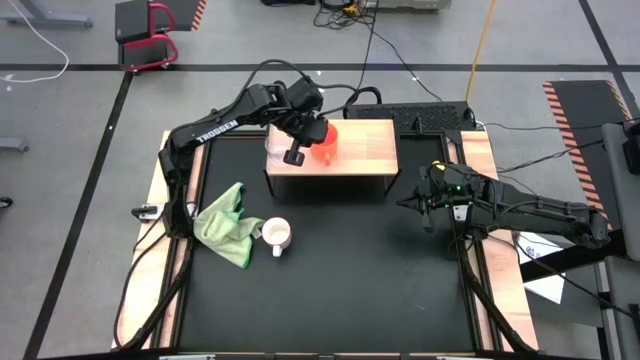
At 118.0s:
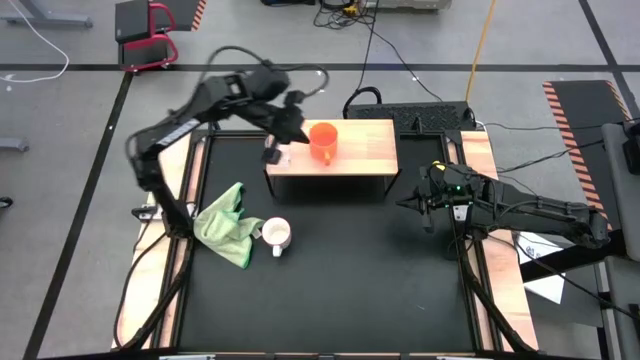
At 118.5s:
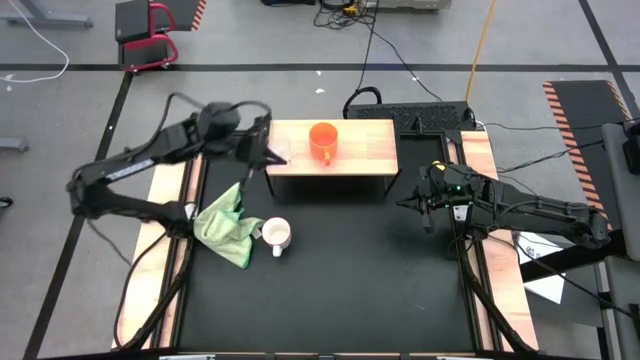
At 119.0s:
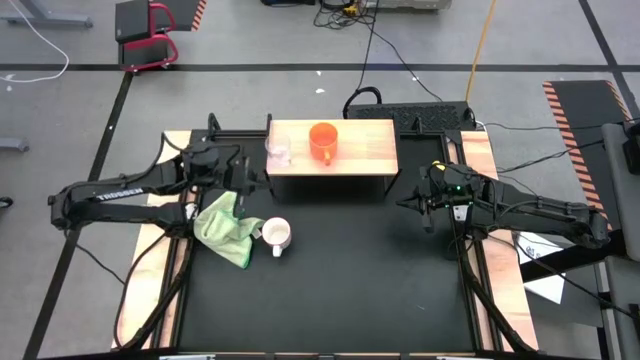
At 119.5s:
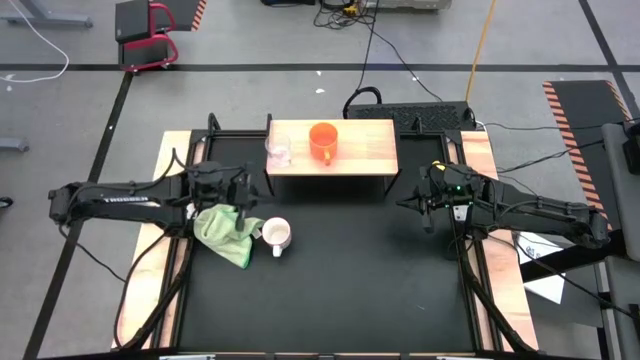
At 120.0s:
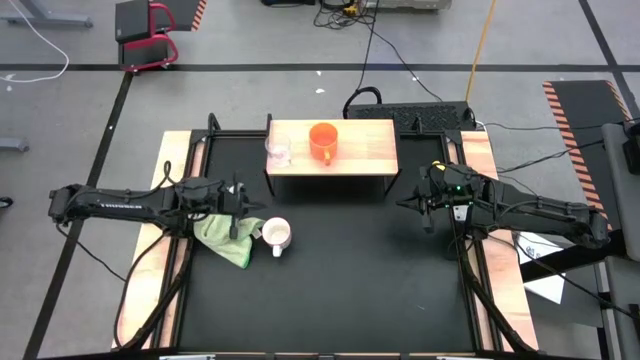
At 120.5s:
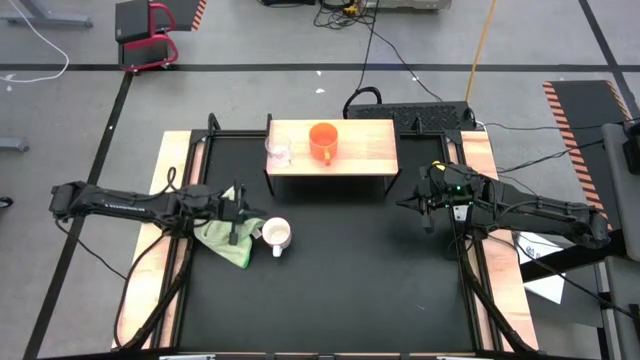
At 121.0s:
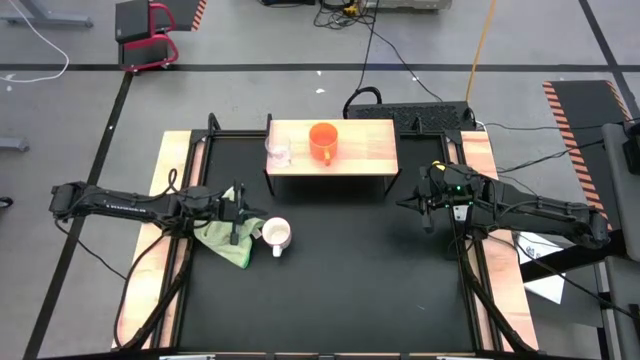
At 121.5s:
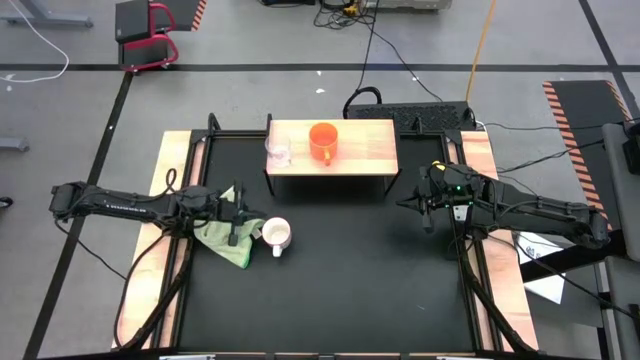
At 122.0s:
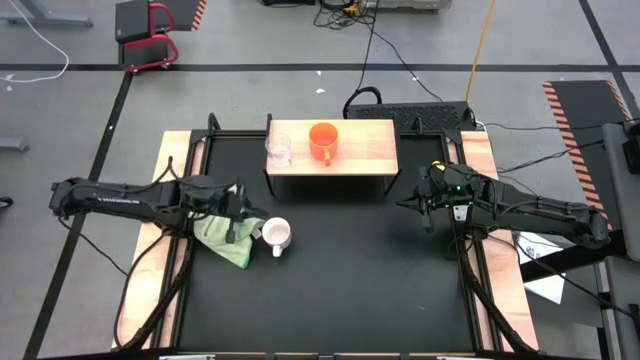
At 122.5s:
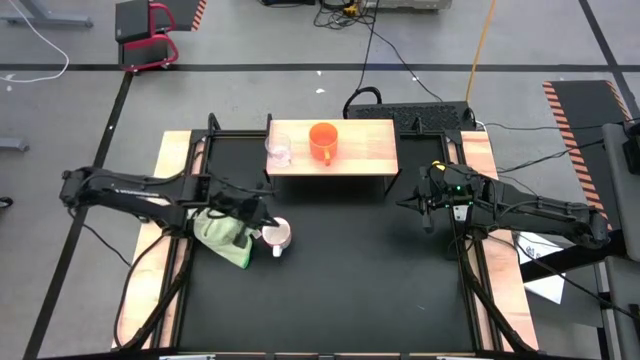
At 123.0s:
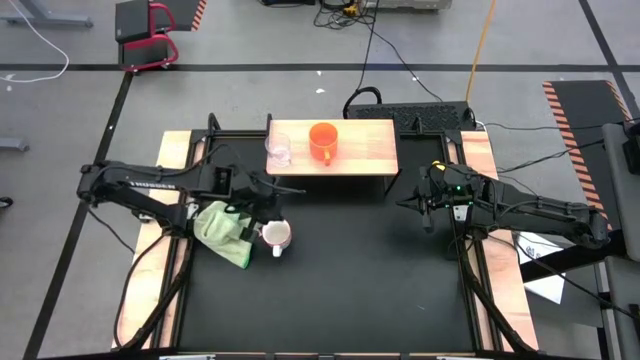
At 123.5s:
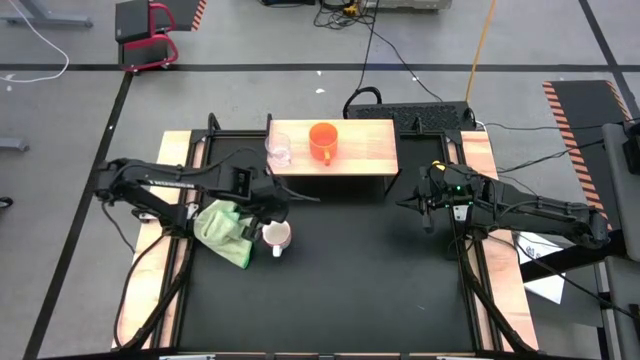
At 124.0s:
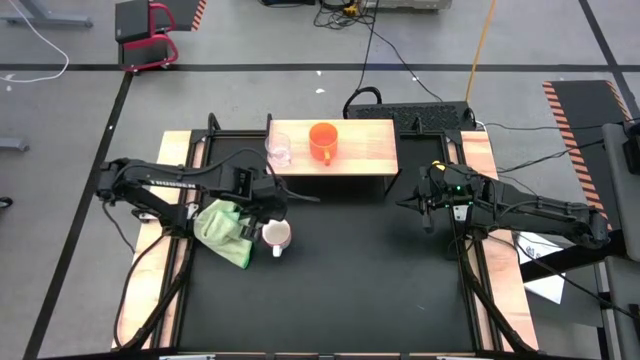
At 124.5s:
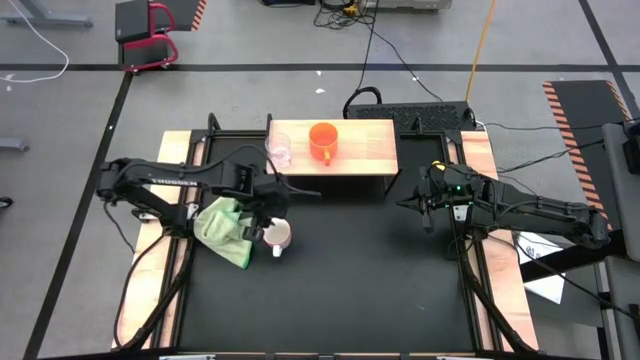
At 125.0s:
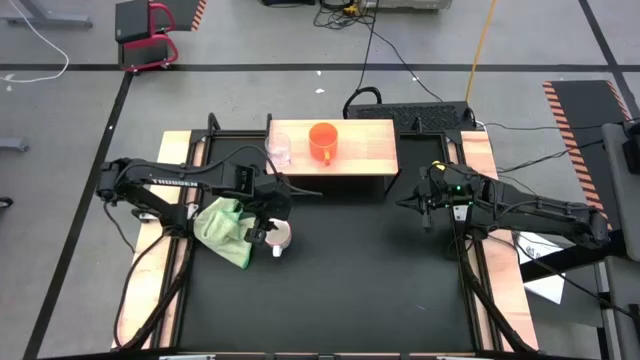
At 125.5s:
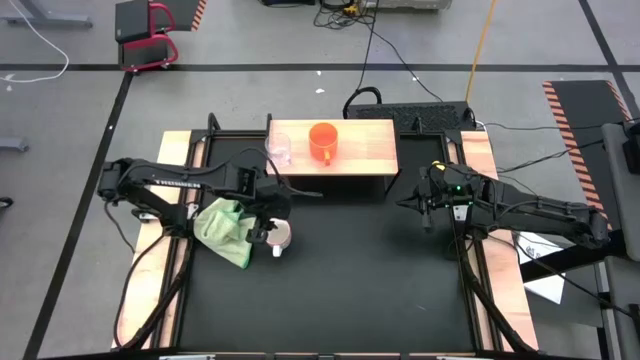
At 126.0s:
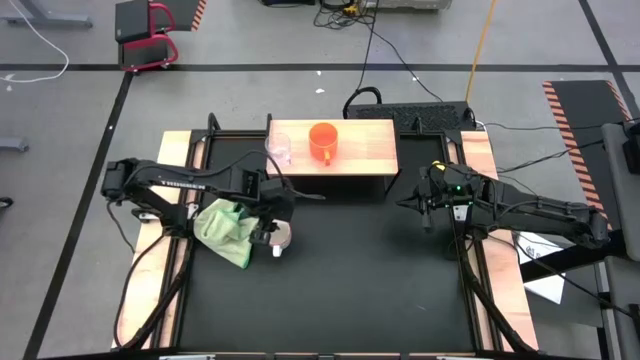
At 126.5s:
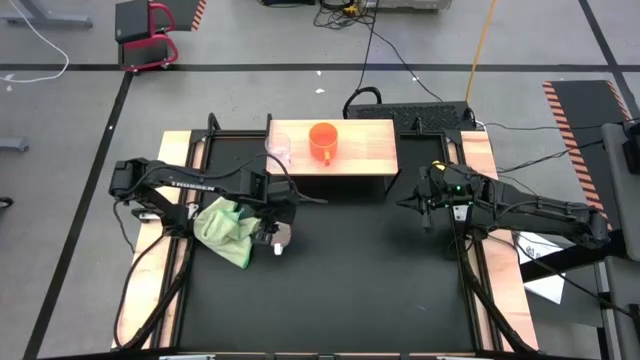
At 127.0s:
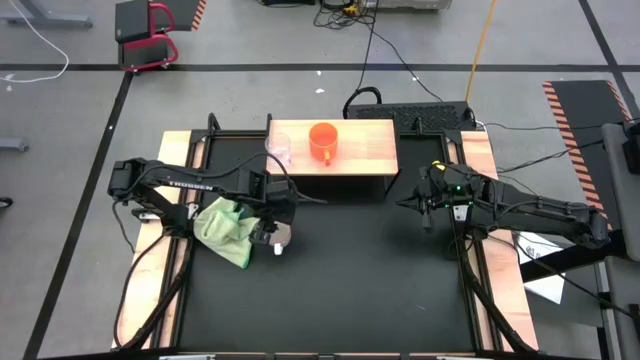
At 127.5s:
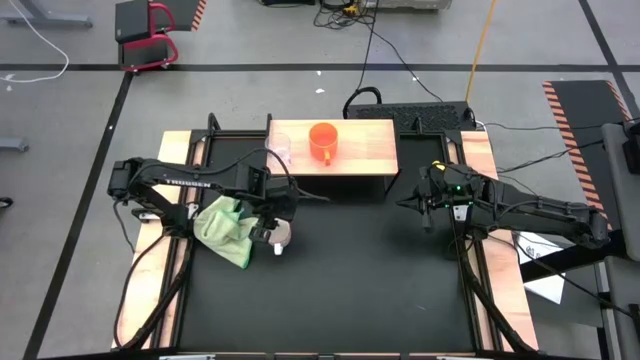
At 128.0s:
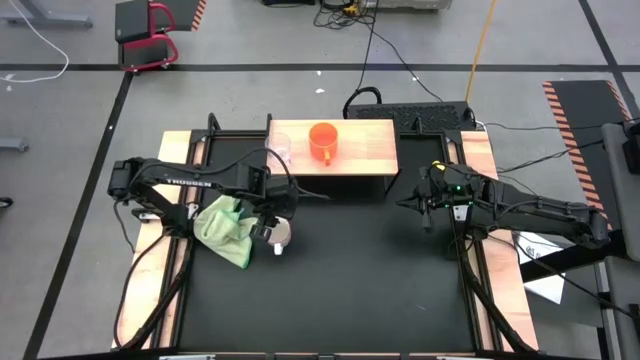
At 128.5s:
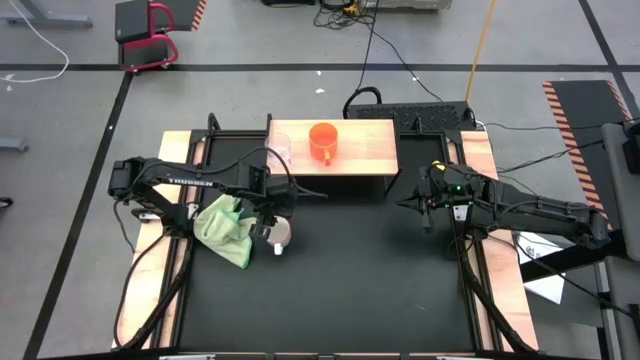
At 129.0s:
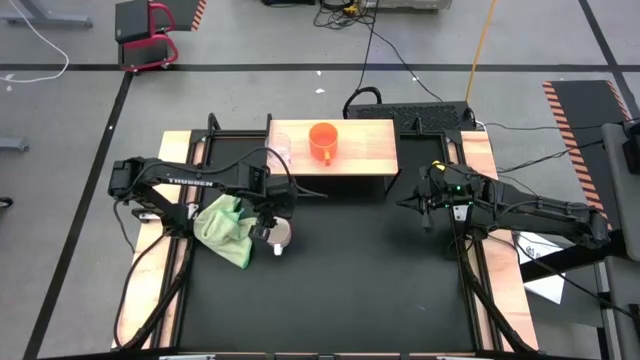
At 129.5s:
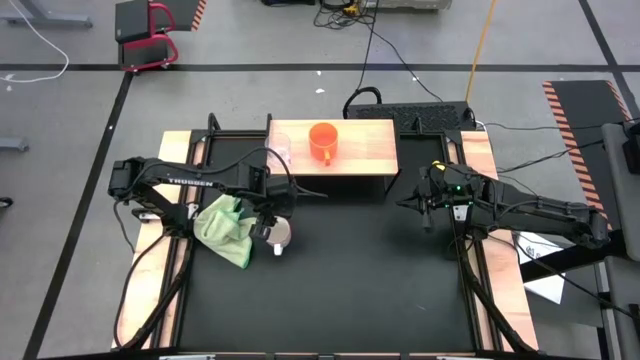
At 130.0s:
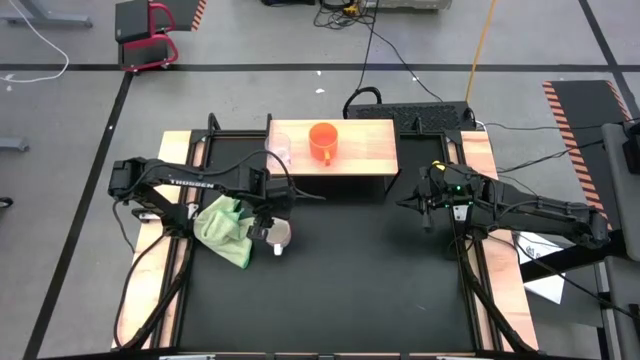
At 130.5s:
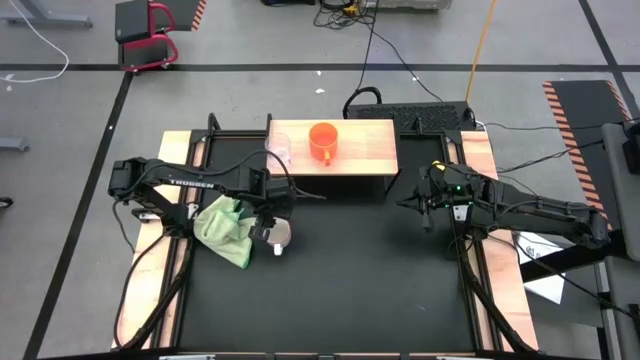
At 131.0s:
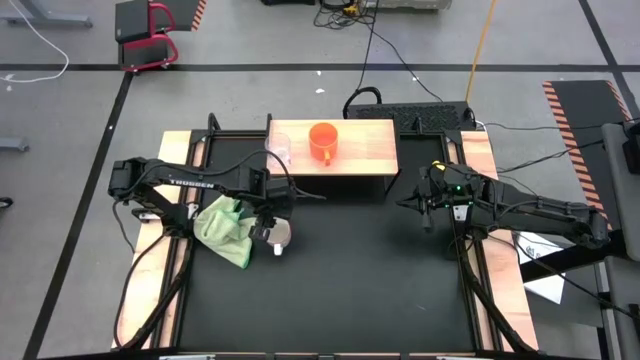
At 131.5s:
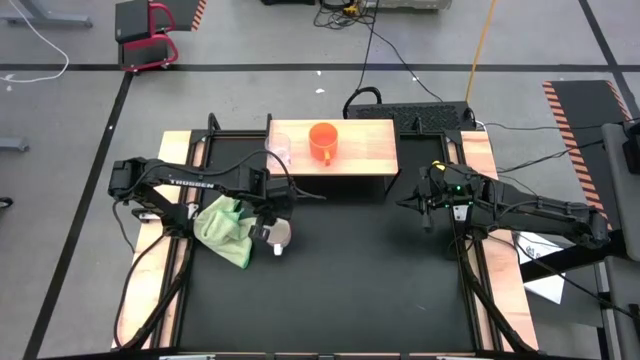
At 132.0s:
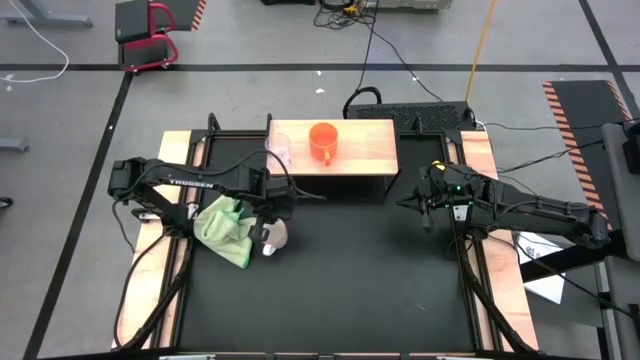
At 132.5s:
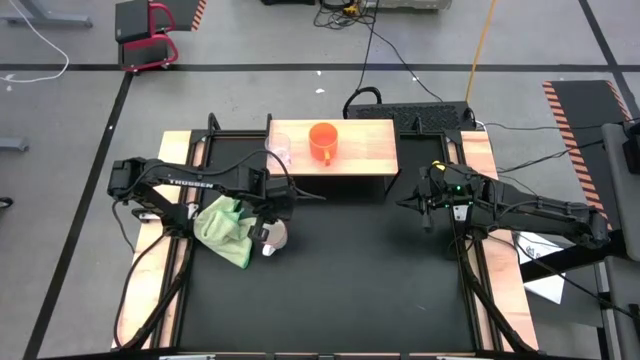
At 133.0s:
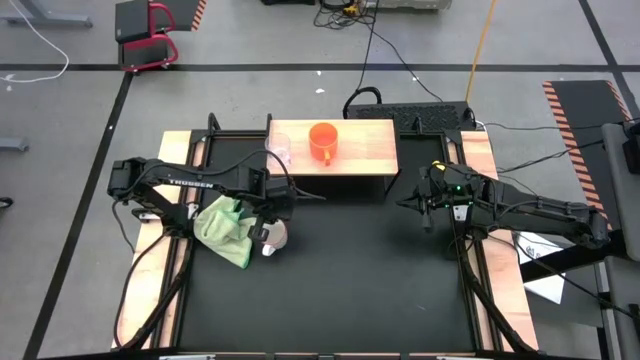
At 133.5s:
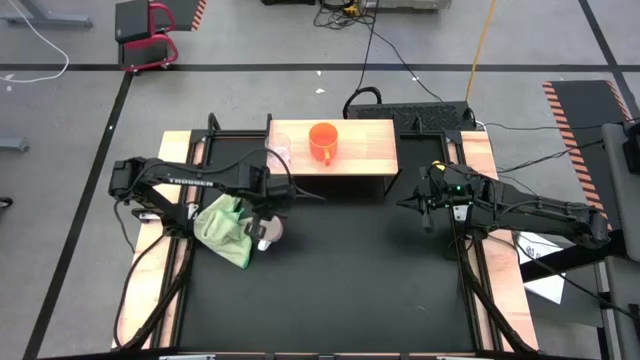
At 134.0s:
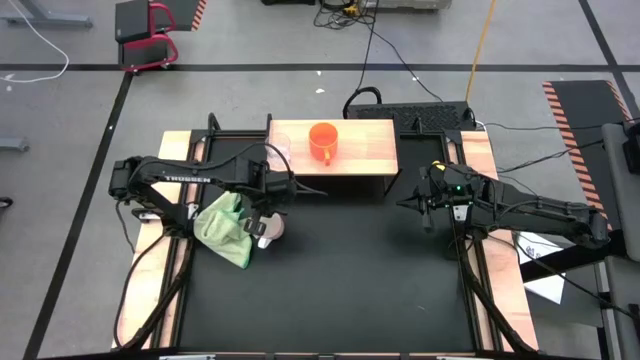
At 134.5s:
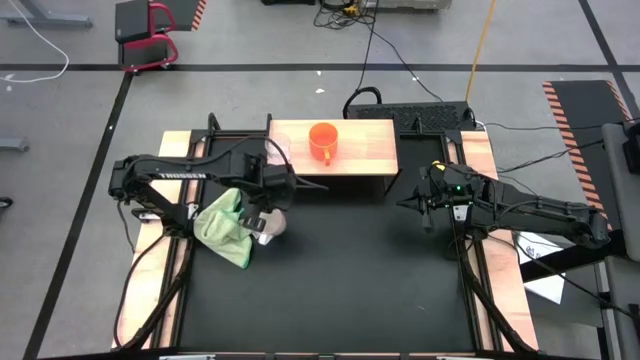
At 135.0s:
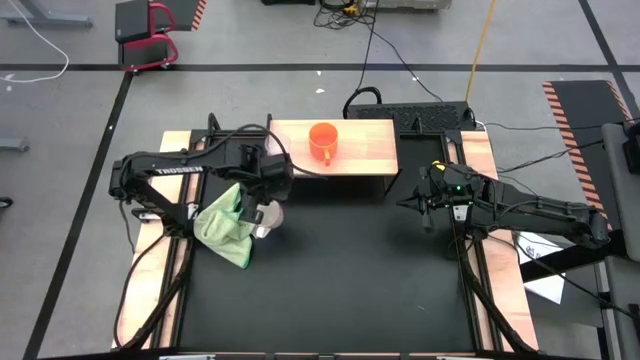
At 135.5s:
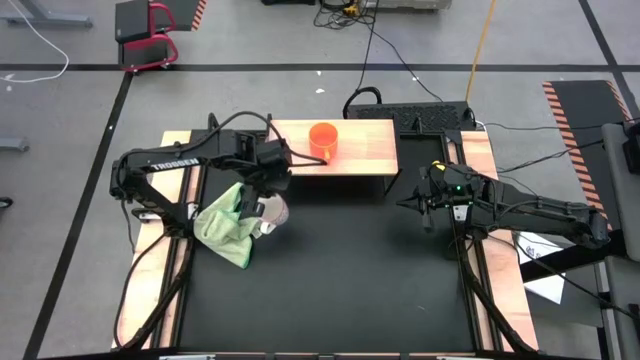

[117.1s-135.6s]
Task: Stack small to large cups/mugs on shelf
Put the white patterned mug on the shelf

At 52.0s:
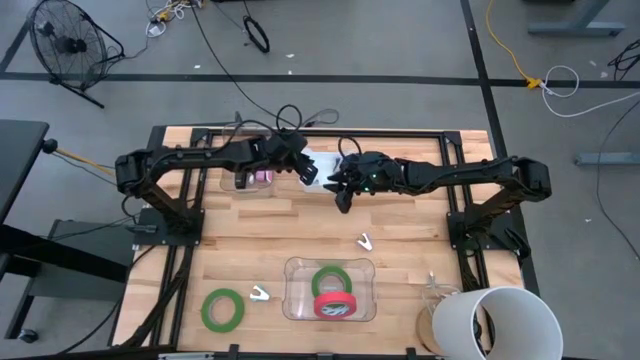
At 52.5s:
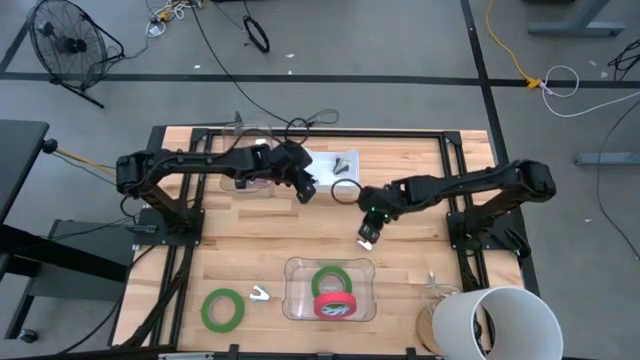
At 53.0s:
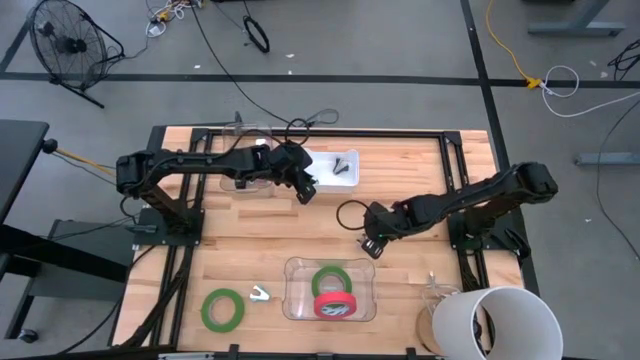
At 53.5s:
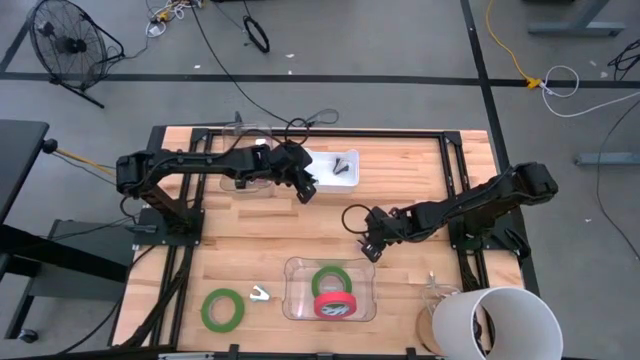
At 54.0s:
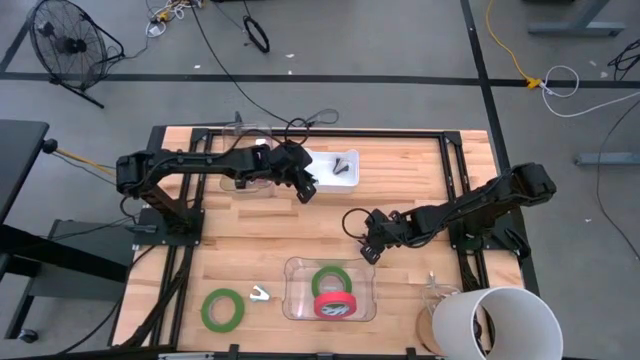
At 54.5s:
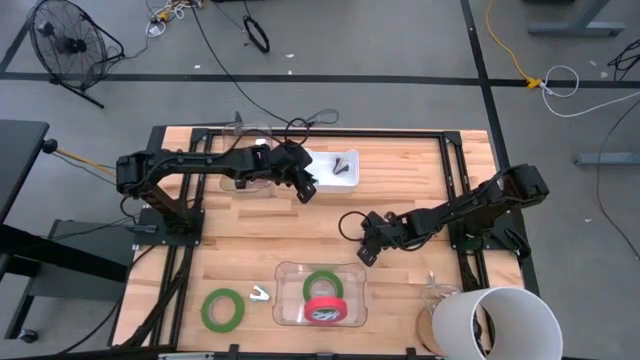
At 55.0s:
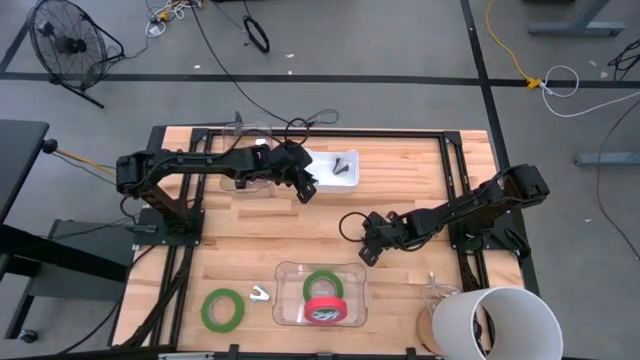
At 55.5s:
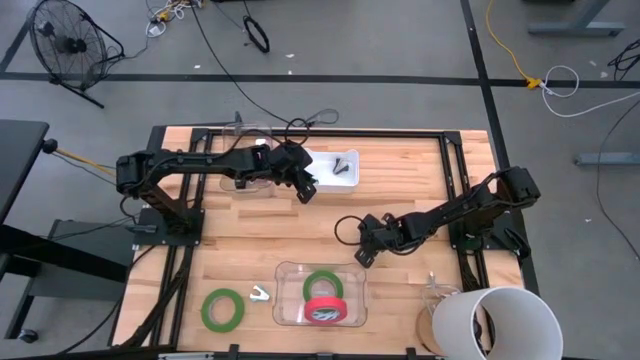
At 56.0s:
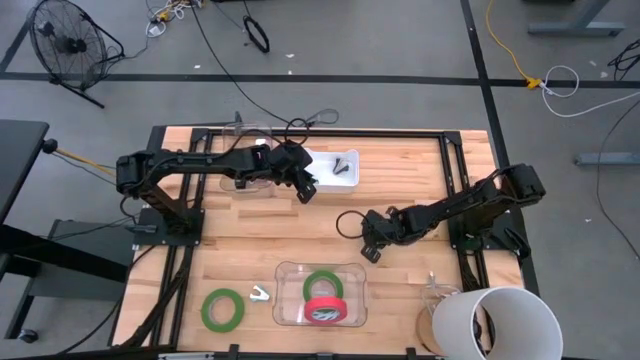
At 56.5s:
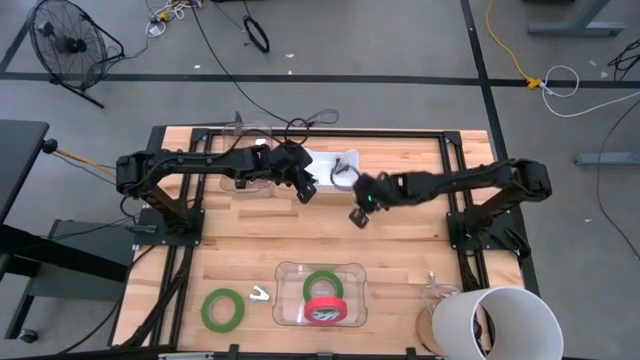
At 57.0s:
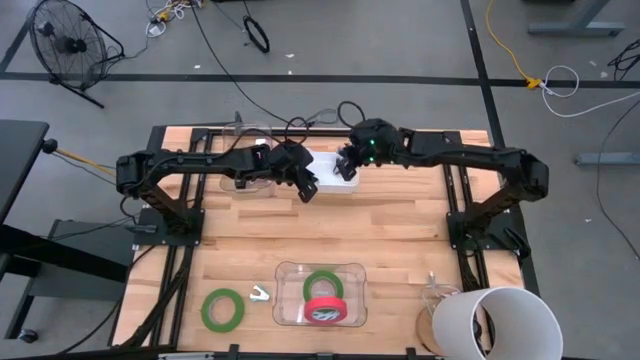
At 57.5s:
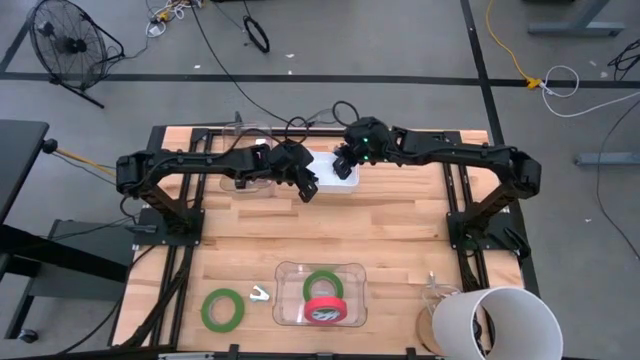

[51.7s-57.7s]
Task: Pick and place Stapler, Stapler remover, tape
Put the purple staple remover into the white bin
